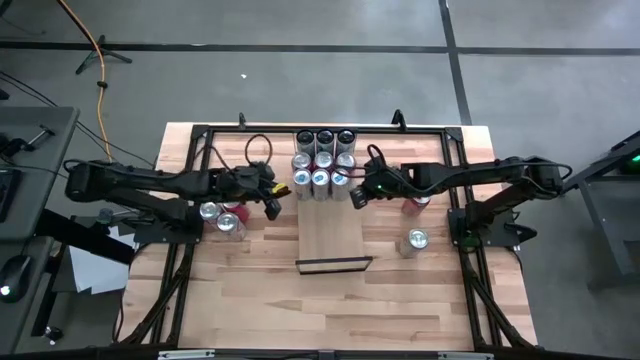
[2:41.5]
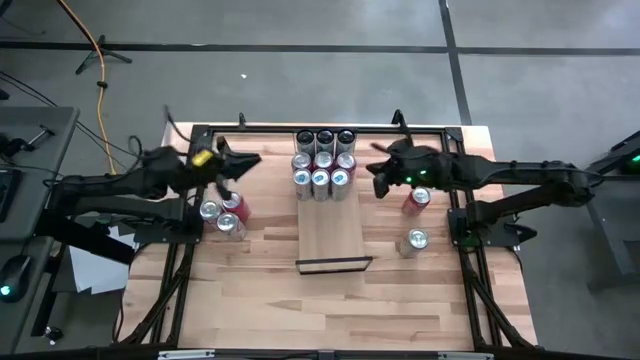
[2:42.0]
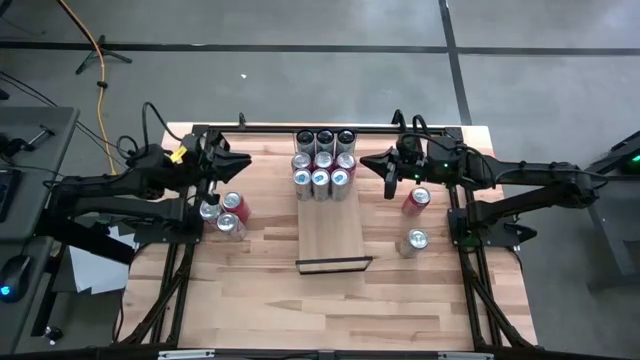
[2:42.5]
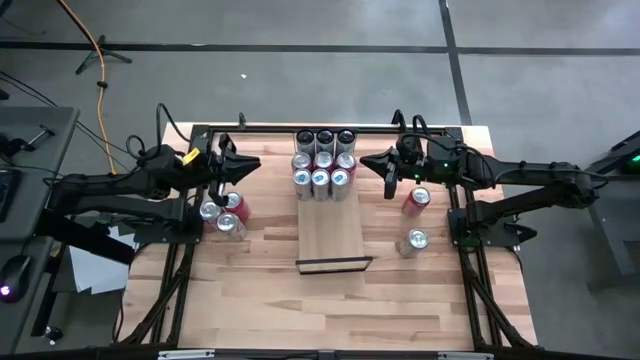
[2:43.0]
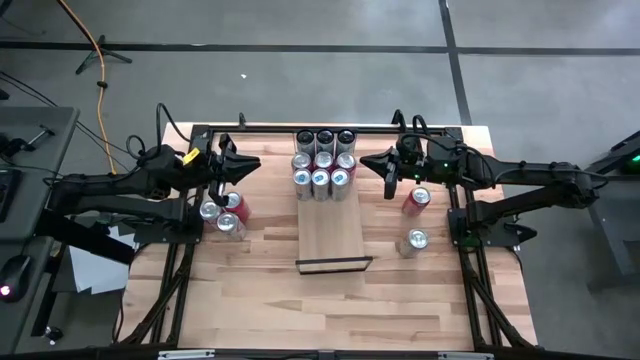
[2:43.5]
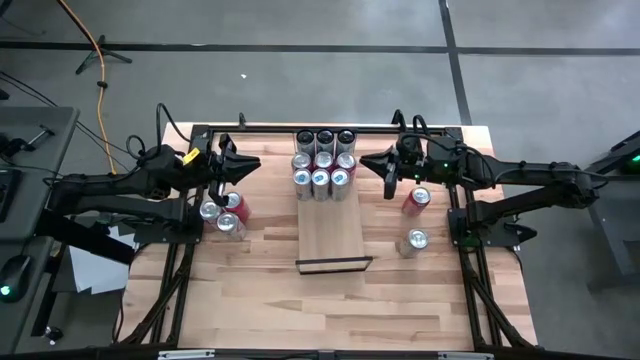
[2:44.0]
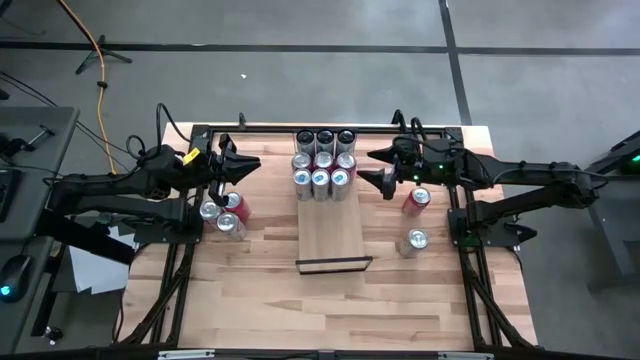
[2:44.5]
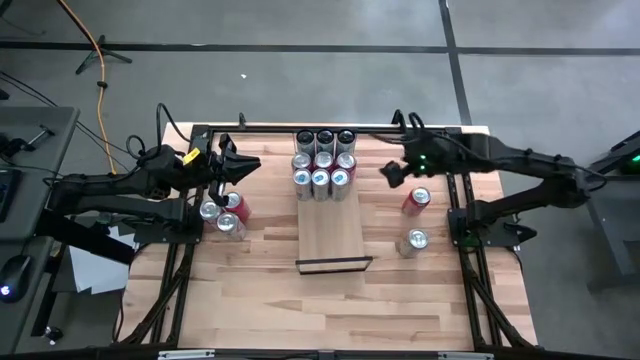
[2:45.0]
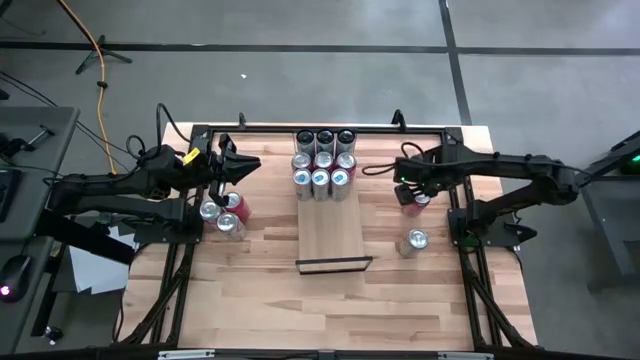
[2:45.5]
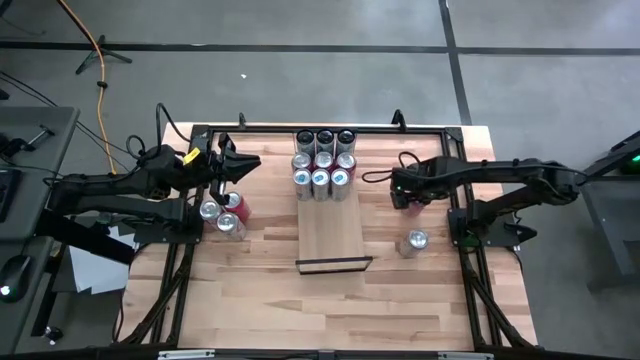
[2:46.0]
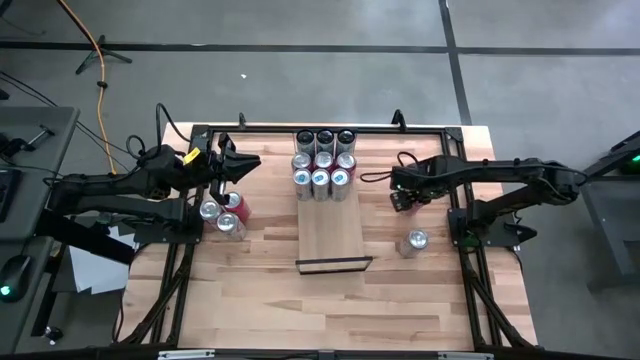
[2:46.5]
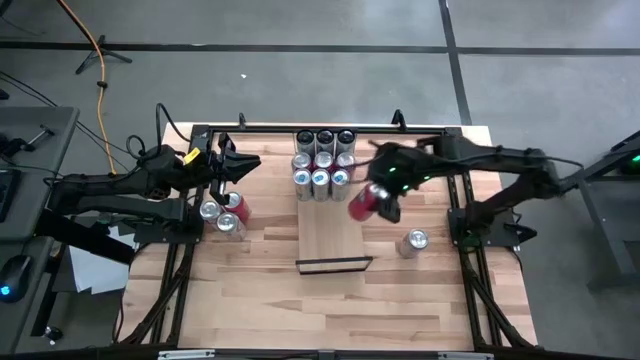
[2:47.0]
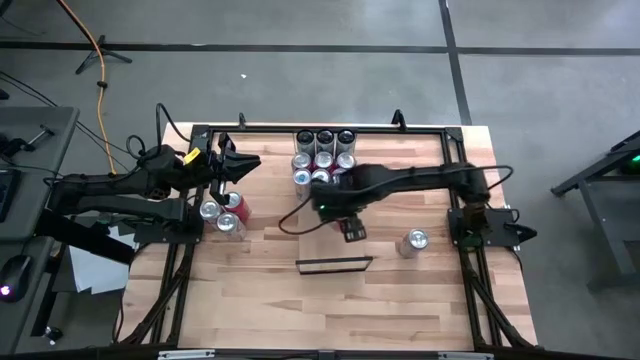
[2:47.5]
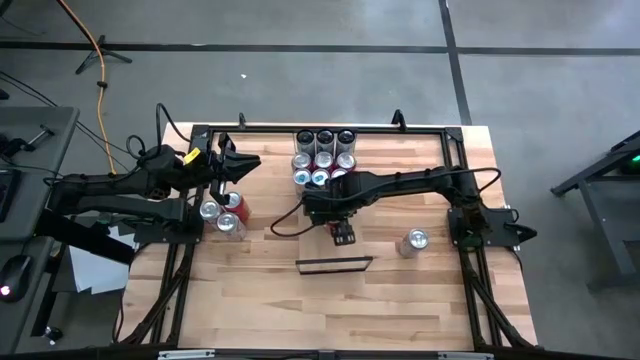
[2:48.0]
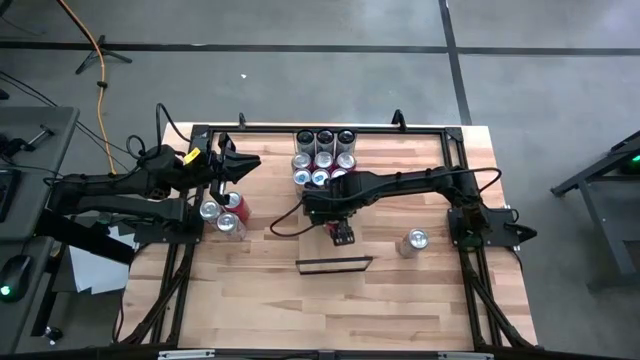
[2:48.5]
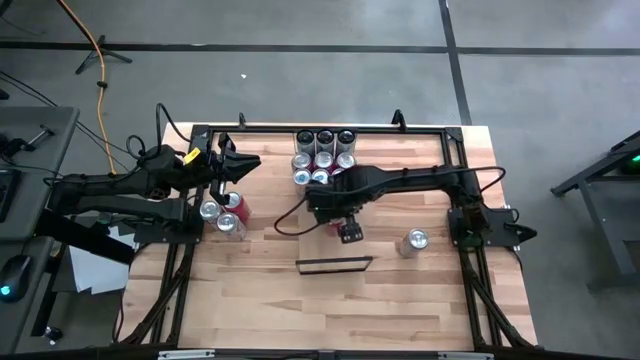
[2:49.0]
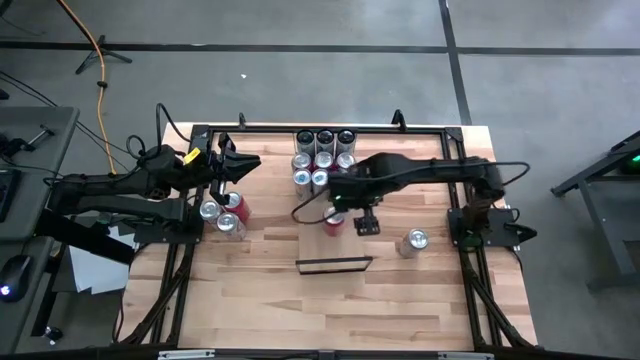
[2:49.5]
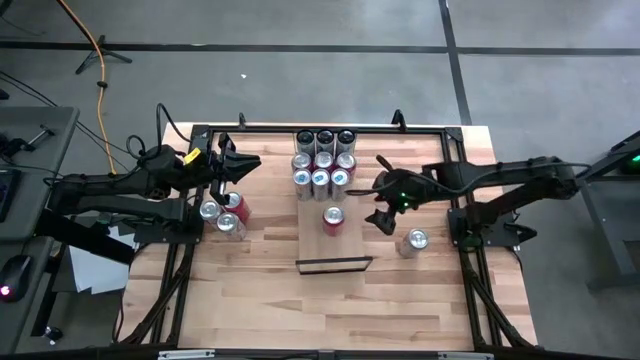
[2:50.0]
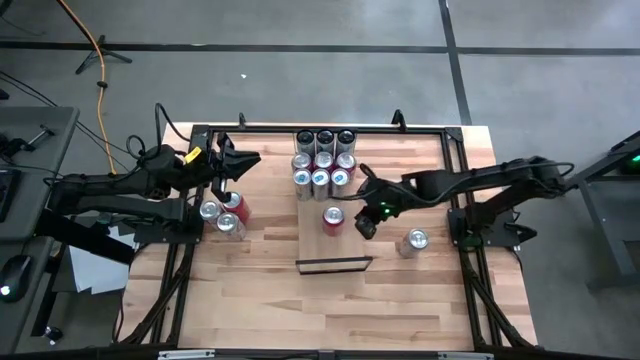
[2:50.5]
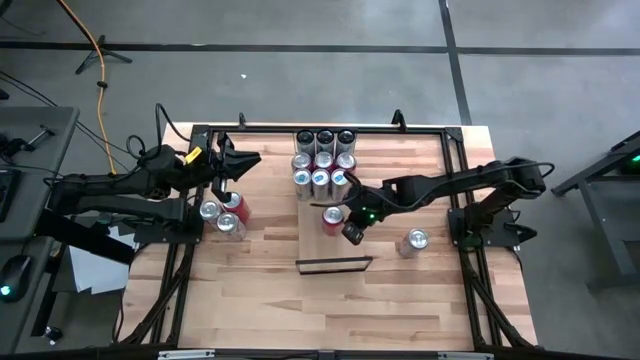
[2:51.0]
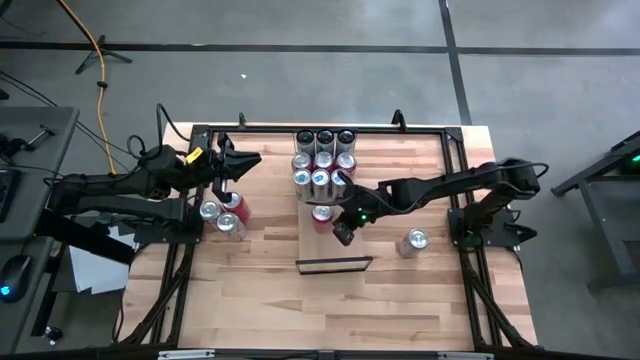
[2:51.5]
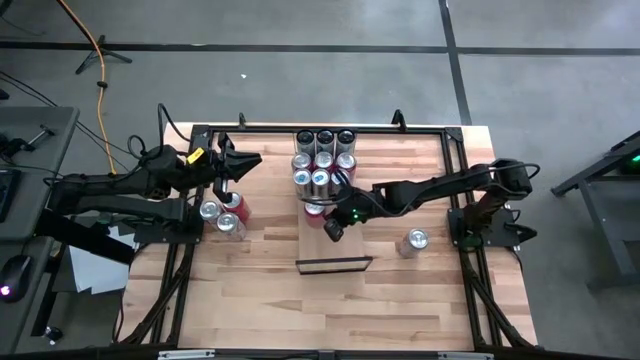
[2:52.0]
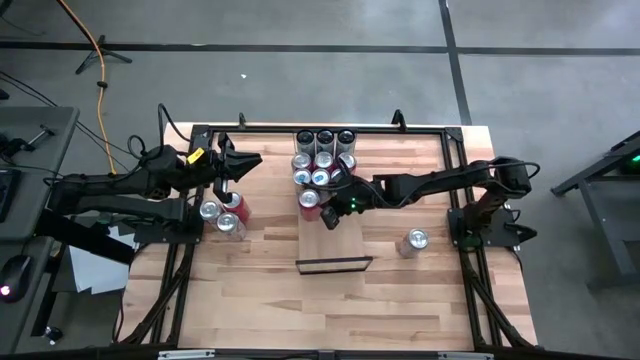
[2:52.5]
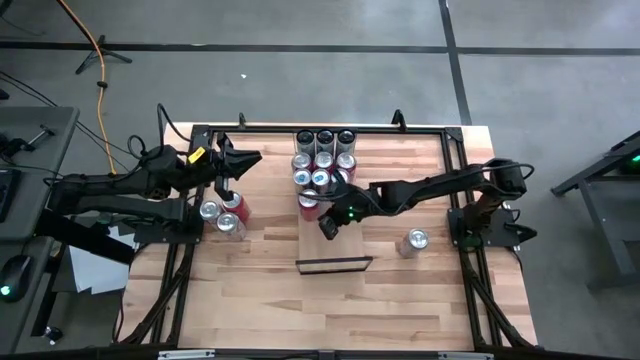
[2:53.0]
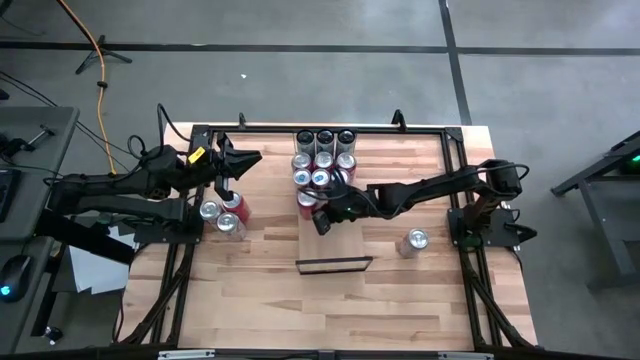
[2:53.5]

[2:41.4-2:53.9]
Task: Place canned beverage on shelf
Put the right red soda can on the shelf

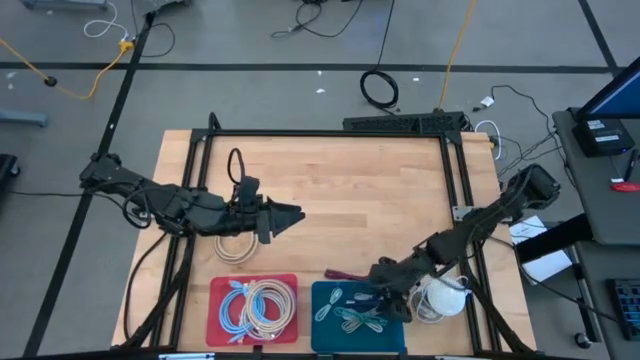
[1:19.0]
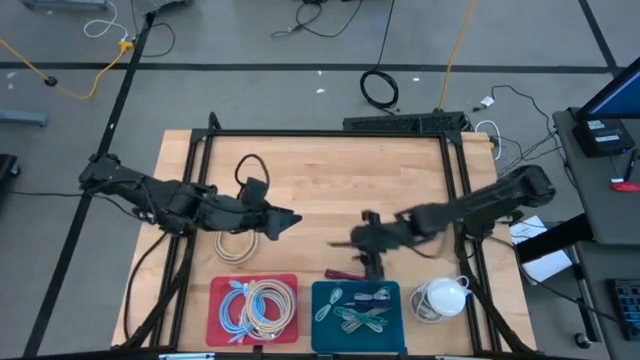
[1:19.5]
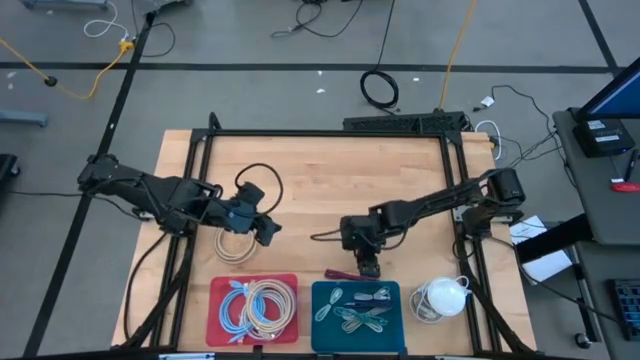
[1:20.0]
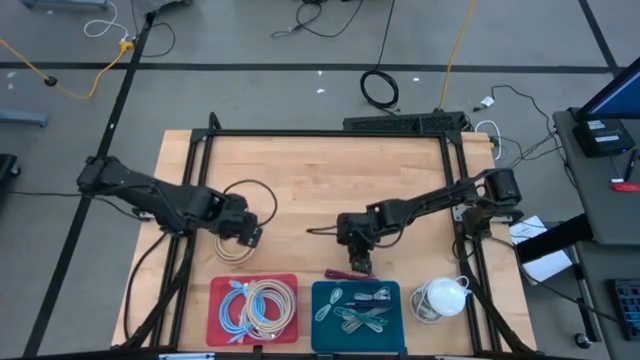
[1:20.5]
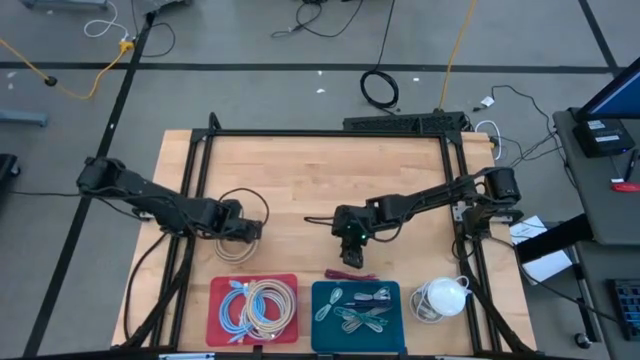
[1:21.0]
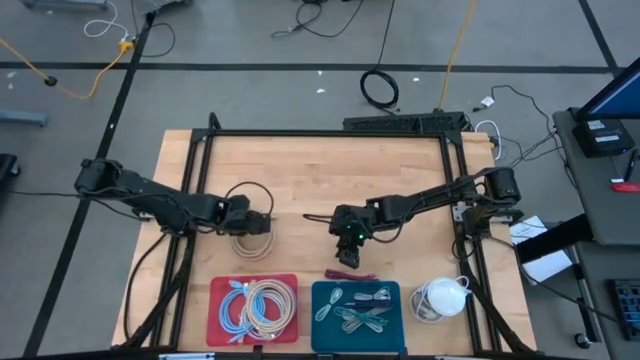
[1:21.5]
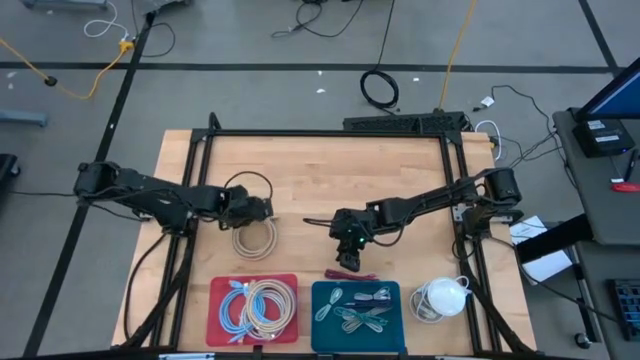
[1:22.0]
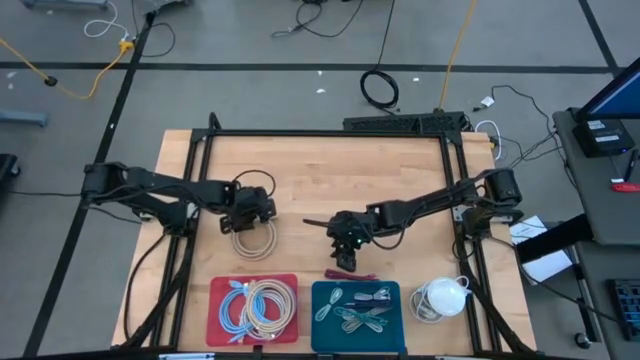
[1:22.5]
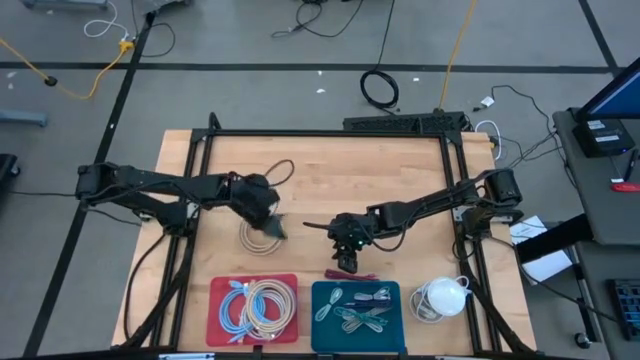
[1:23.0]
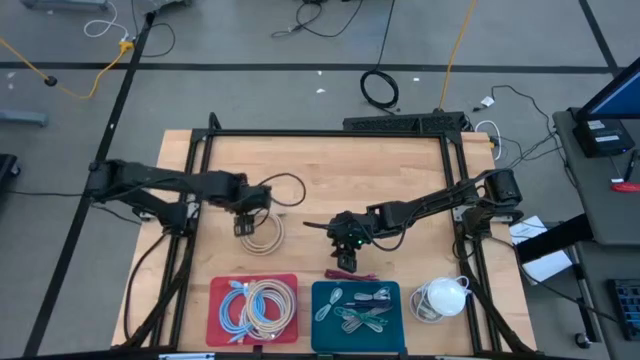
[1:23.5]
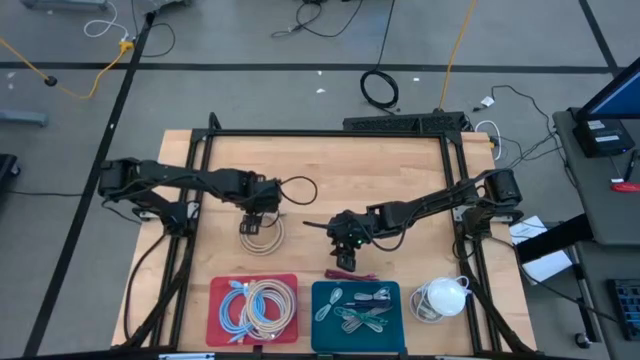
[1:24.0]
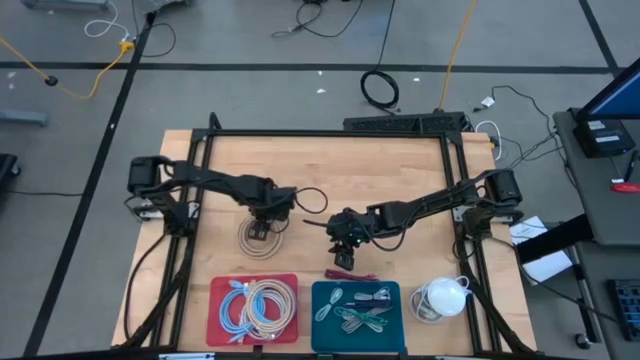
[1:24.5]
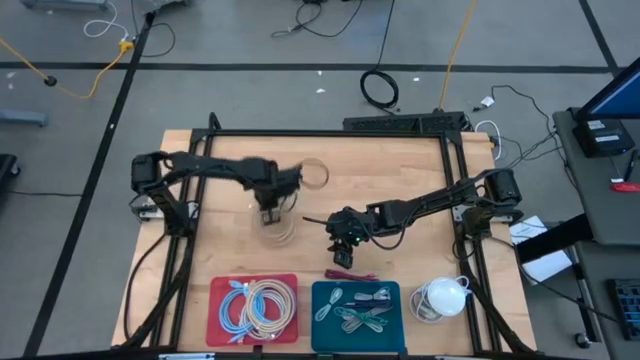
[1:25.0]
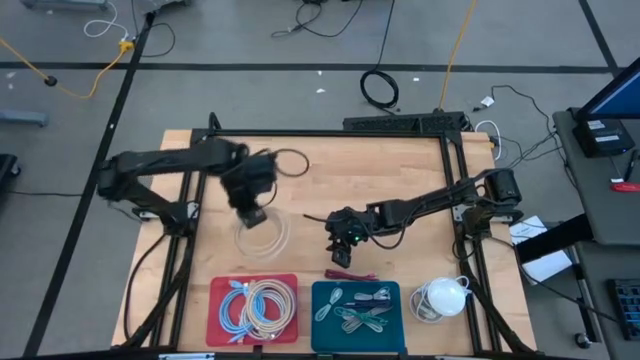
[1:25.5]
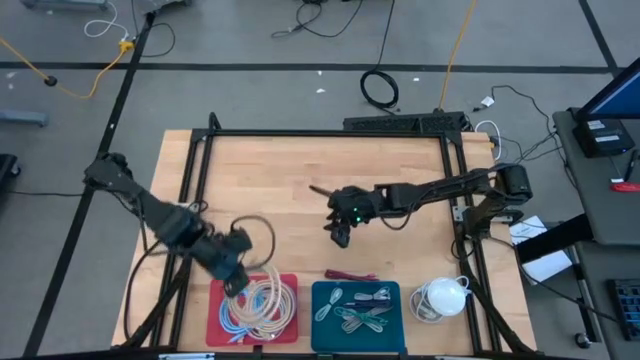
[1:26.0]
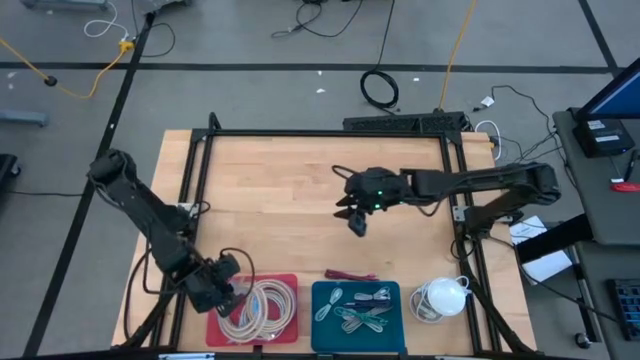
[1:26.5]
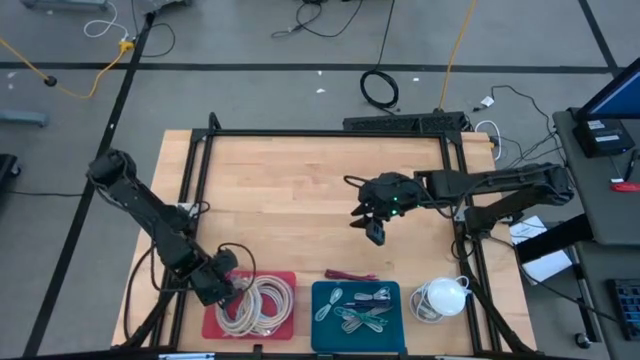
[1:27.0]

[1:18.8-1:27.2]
Task: Pick & Place USB Port
Put the brown HDMI cable into the red bin
